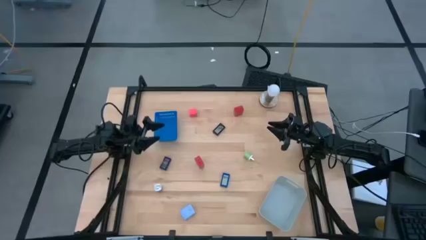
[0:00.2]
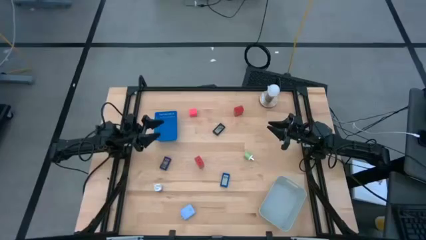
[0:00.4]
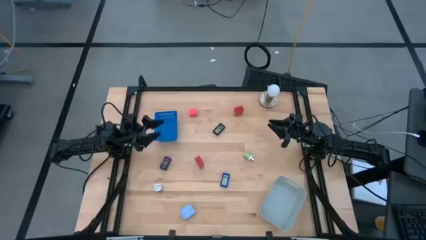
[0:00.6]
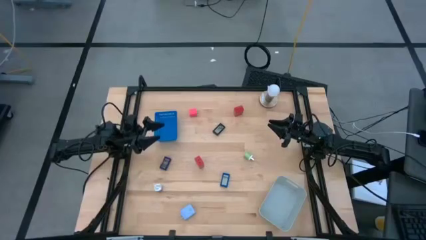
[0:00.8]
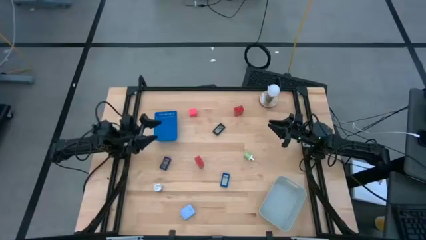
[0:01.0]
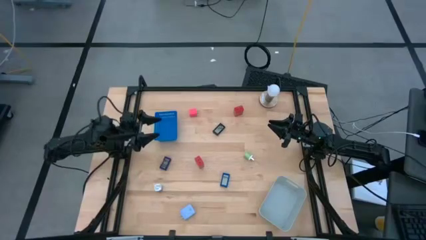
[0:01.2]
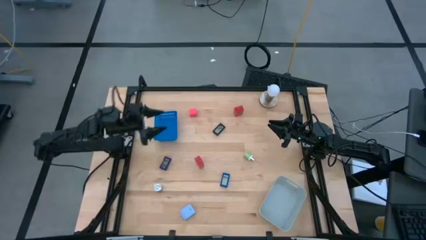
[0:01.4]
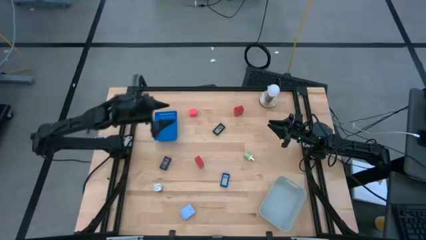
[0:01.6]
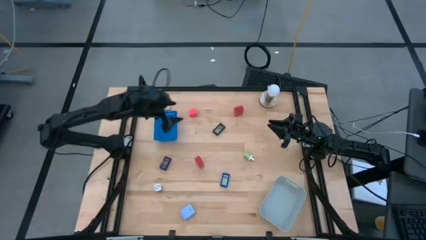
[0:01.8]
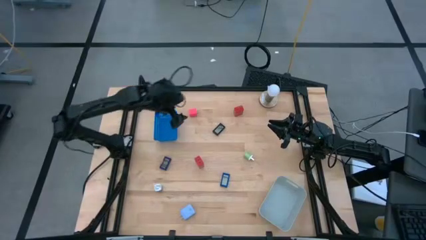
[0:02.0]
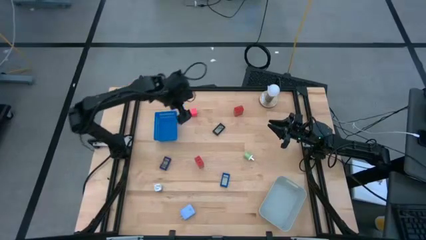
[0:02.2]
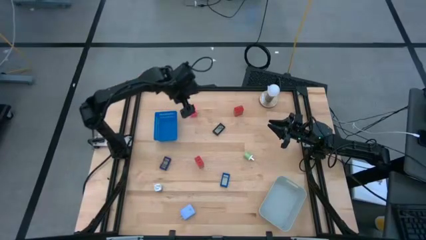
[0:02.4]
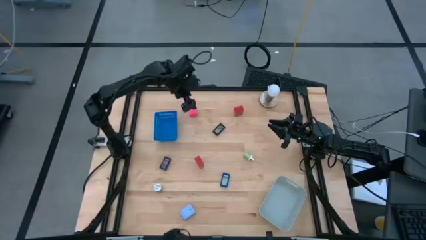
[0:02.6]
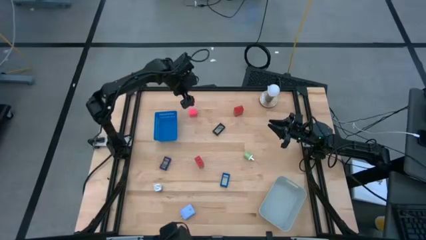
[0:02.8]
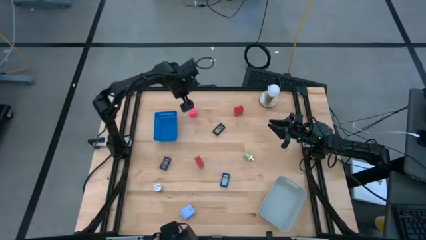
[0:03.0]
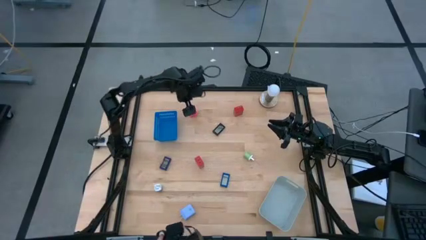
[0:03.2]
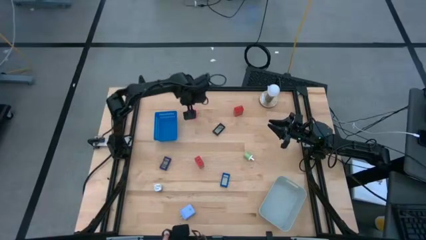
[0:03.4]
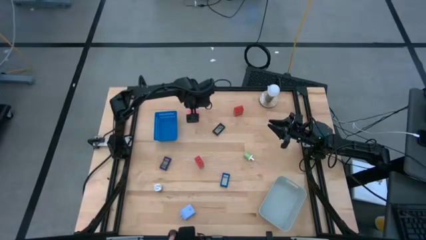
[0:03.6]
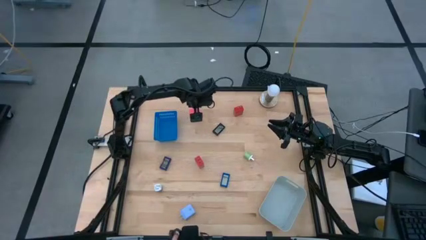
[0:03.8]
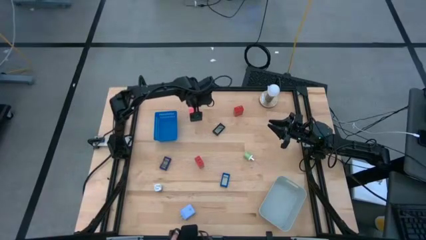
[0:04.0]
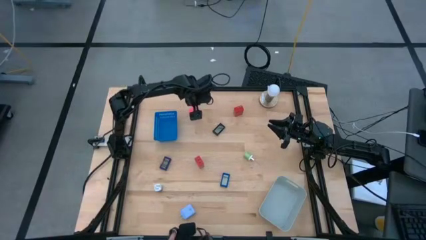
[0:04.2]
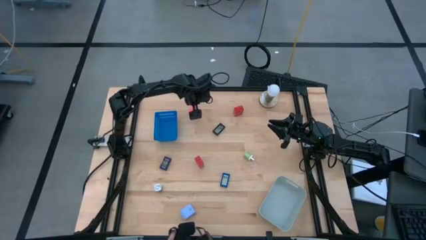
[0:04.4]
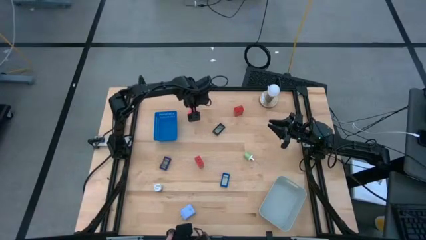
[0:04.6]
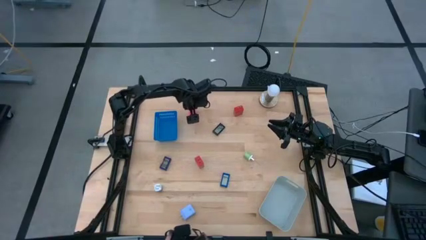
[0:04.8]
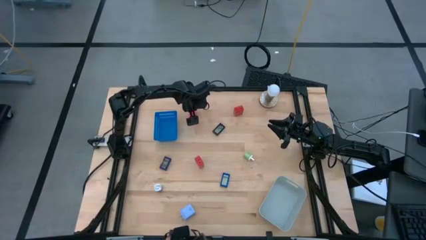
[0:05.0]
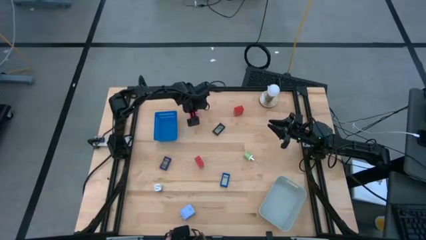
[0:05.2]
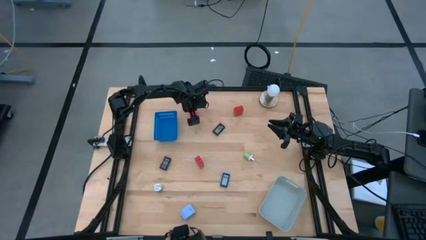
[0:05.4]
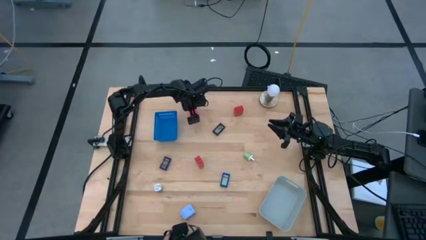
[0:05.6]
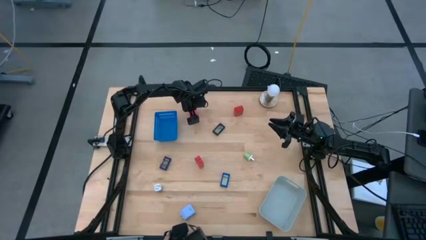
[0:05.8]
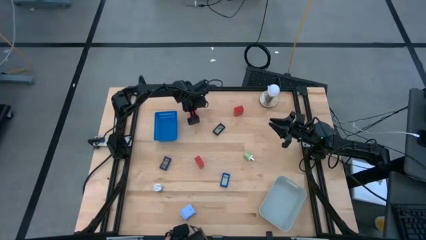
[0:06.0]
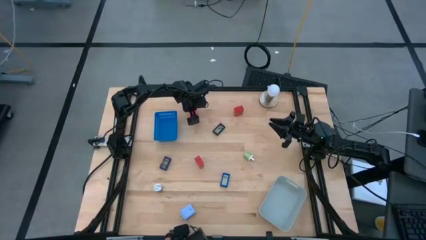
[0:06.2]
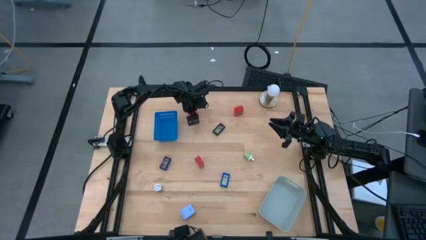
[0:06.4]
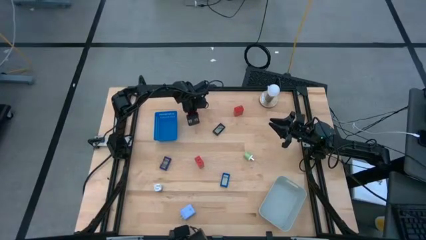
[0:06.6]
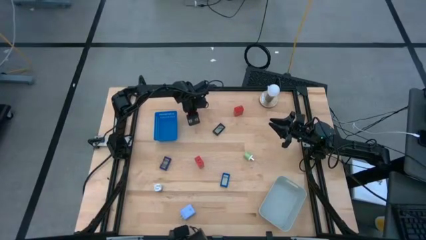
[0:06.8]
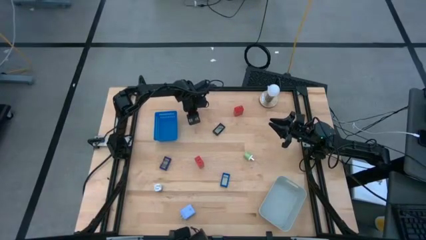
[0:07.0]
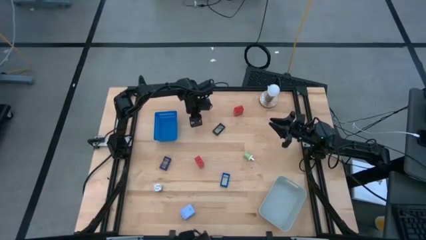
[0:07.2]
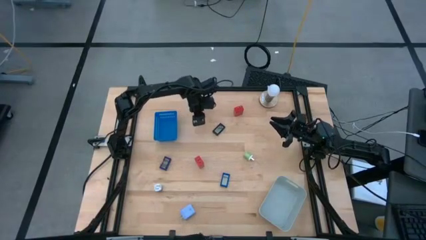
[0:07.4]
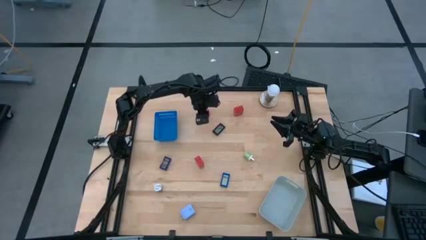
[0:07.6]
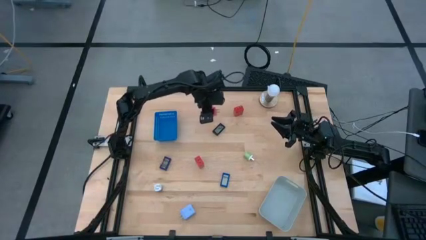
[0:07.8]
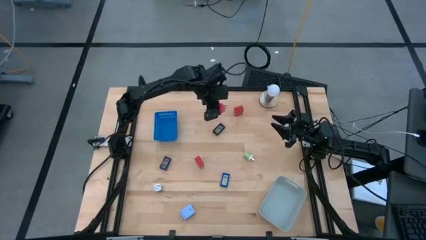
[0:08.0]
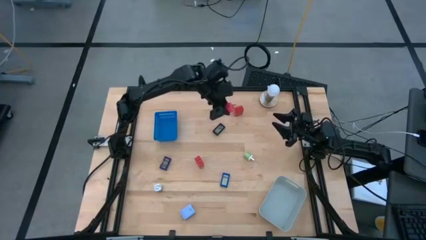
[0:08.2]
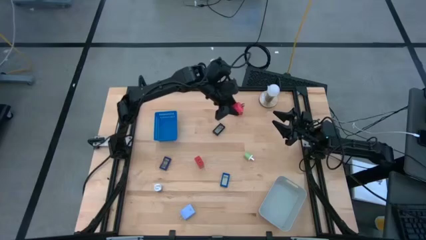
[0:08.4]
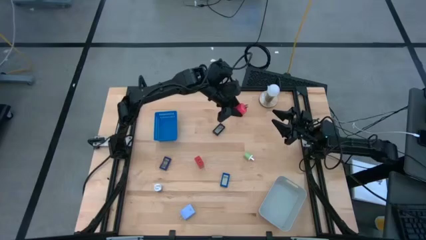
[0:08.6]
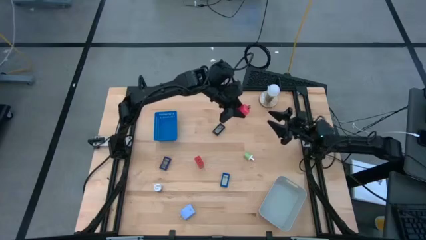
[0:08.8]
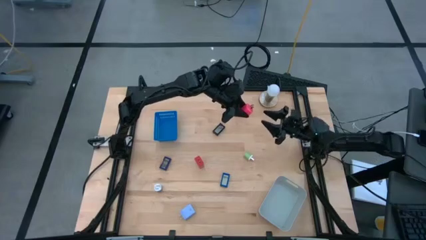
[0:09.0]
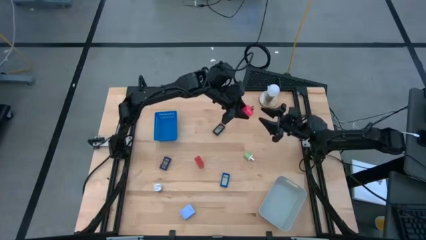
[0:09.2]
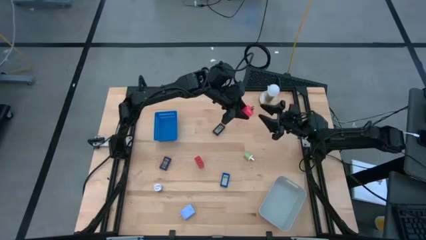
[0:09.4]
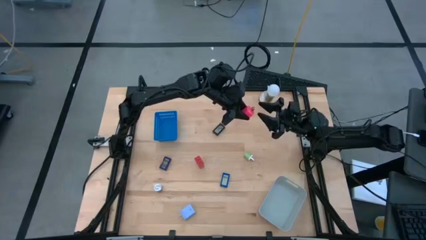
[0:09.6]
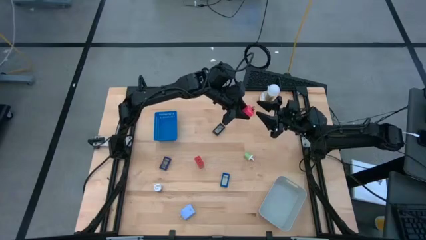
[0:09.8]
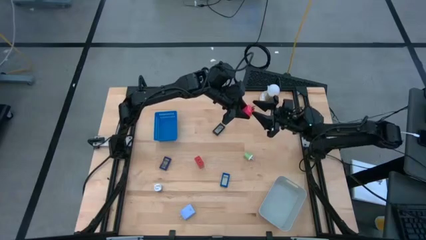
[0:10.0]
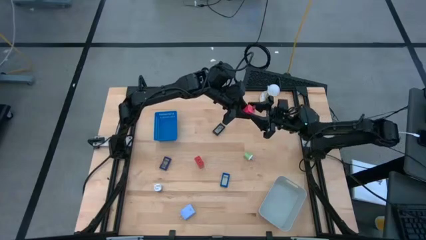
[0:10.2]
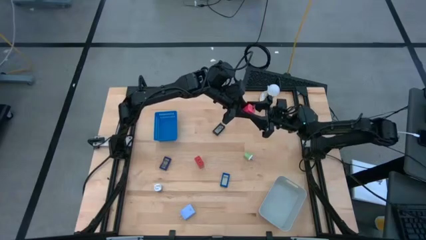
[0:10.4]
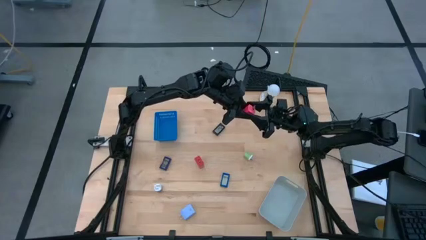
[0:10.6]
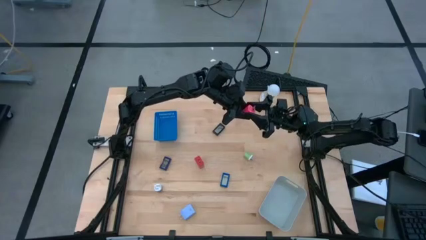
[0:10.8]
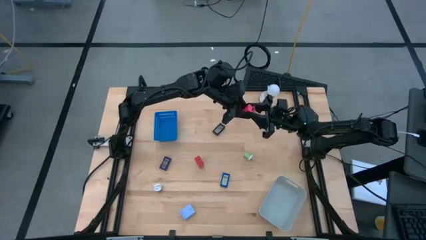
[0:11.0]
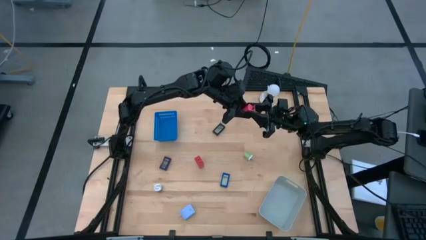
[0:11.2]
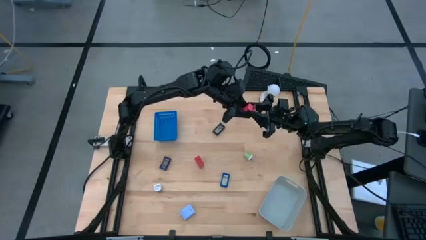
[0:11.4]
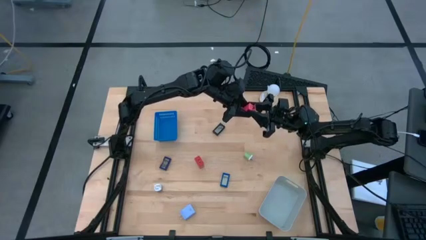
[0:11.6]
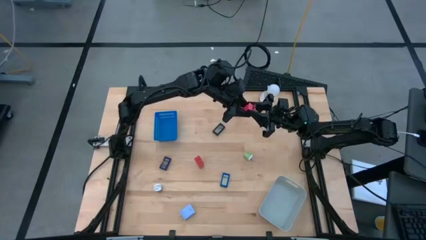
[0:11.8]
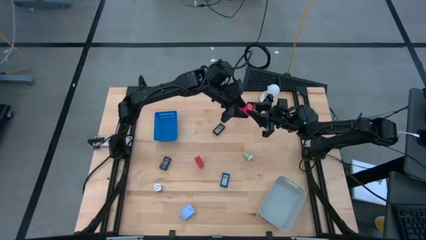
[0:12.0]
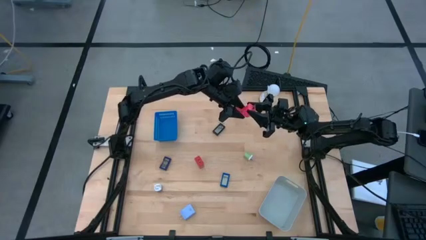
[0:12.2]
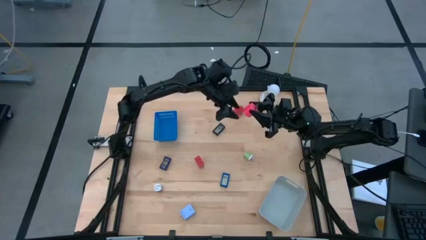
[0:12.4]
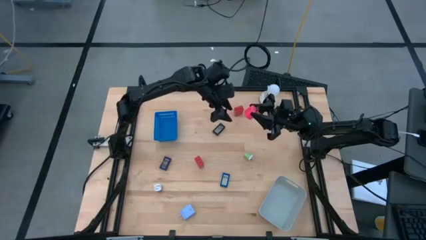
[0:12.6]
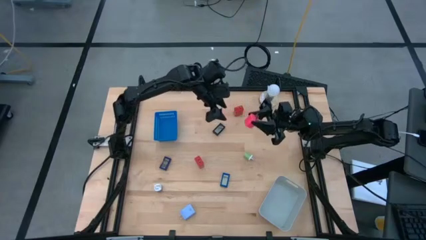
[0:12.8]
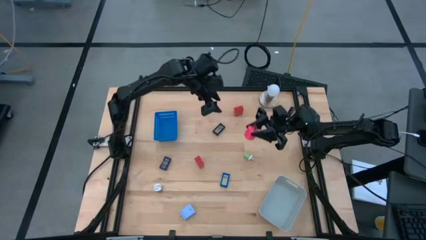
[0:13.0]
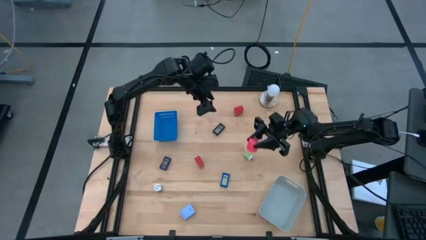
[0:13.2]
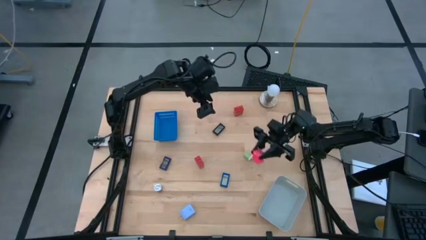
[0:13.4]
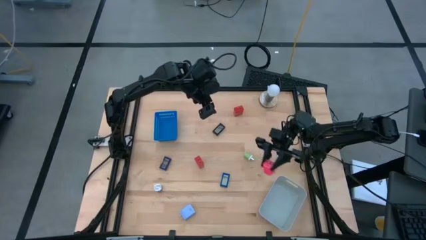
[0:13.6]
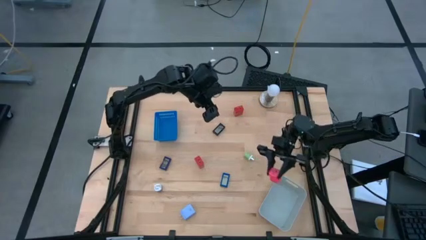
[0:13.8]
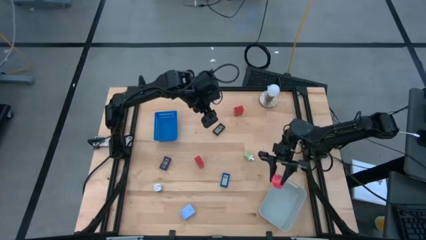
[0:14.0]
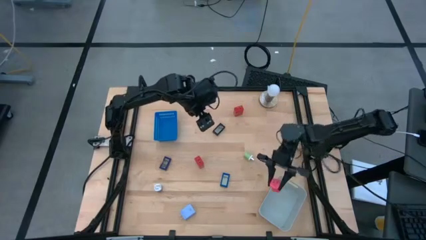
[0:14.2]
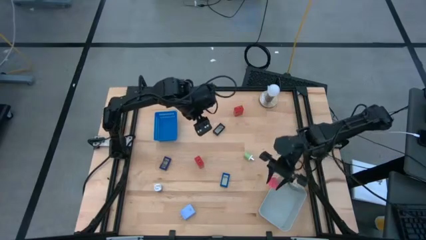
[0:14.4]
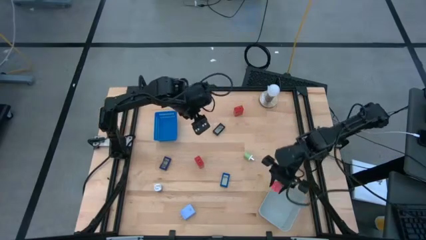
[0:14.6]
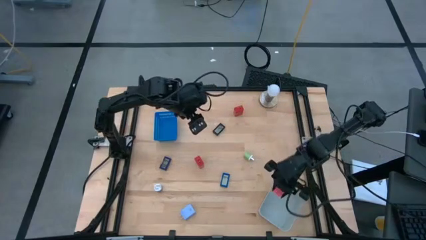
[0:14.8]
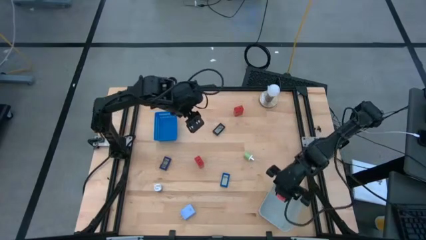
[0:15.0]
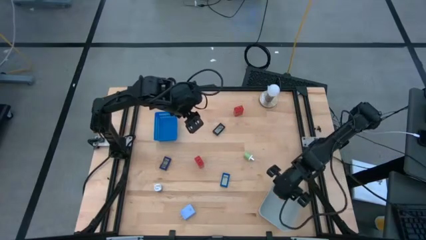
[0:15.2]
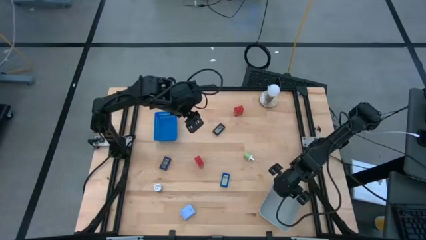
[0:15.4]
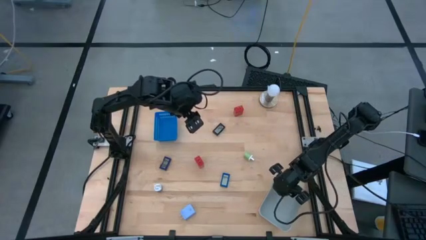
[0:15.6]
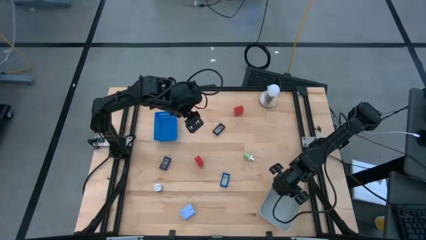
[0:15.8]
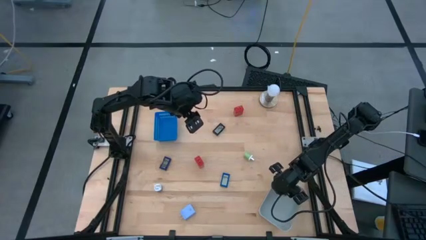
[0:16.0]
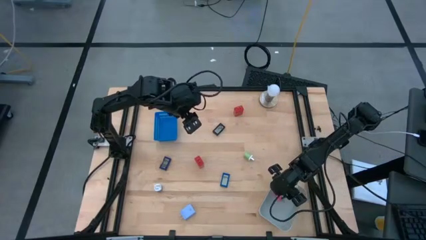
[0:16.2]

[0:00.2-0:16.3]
Task: Pick & Place Office items
Put the pink charger adapter into the white bin
